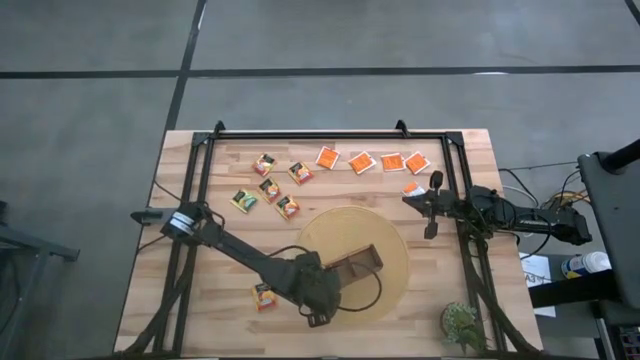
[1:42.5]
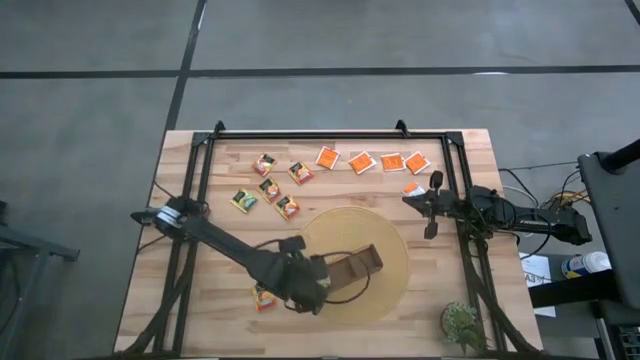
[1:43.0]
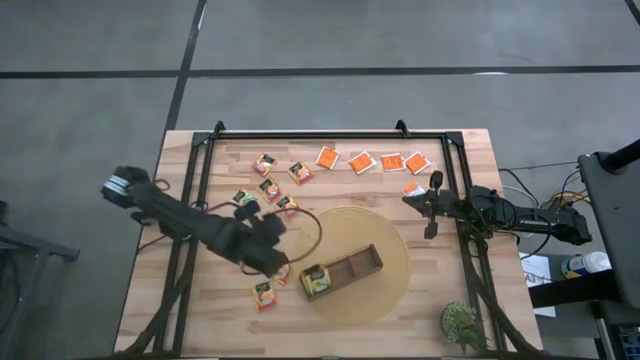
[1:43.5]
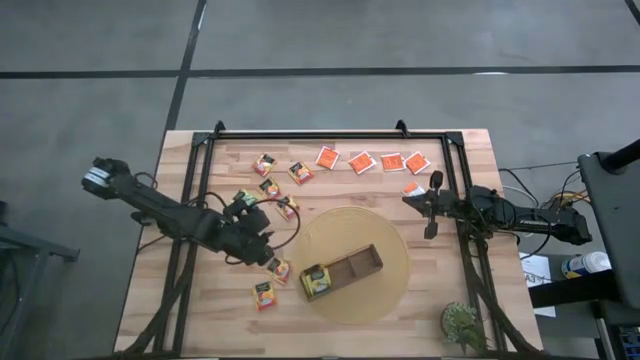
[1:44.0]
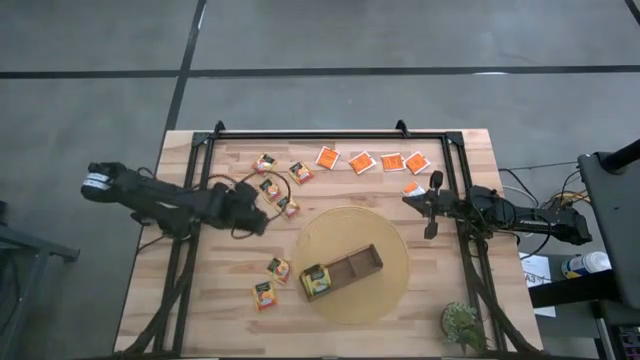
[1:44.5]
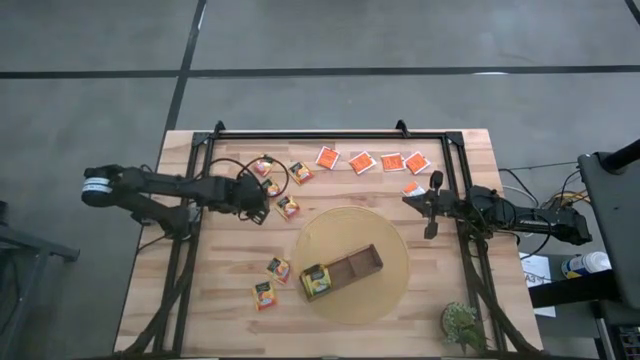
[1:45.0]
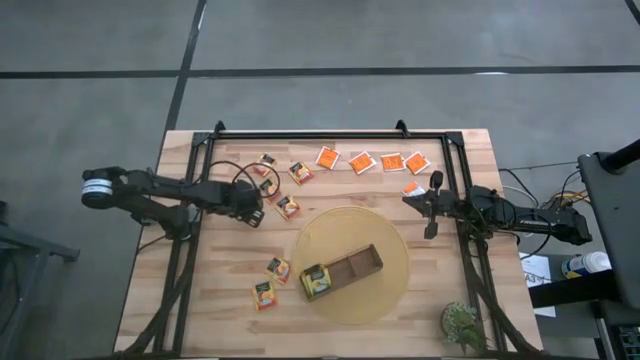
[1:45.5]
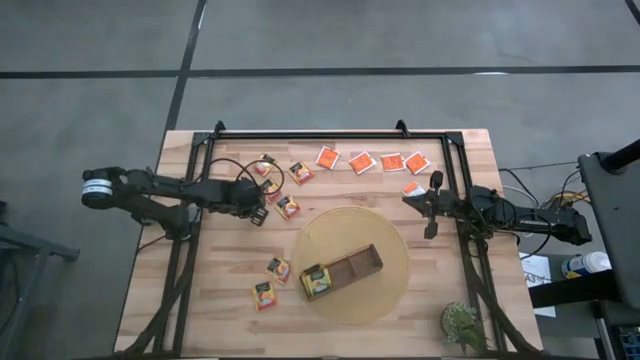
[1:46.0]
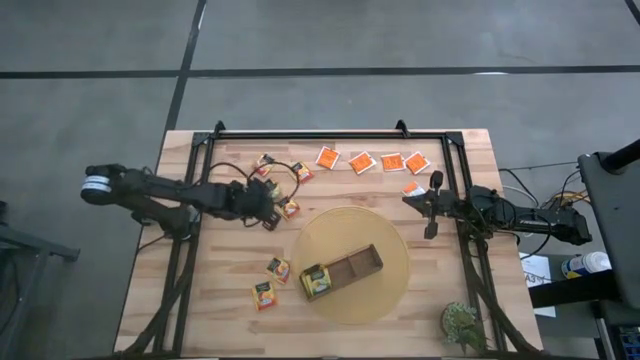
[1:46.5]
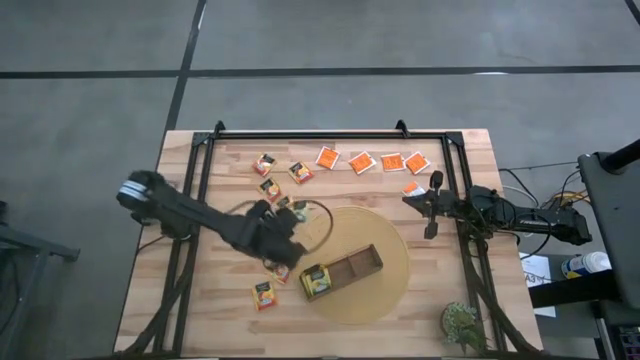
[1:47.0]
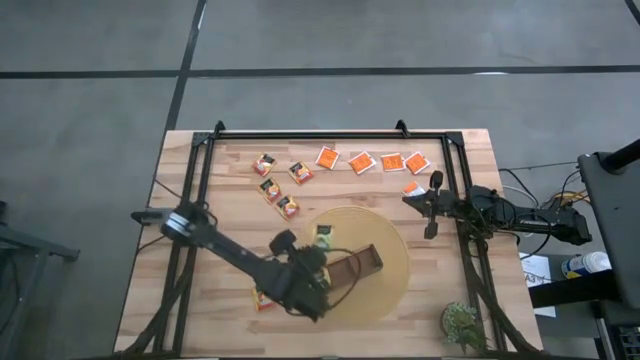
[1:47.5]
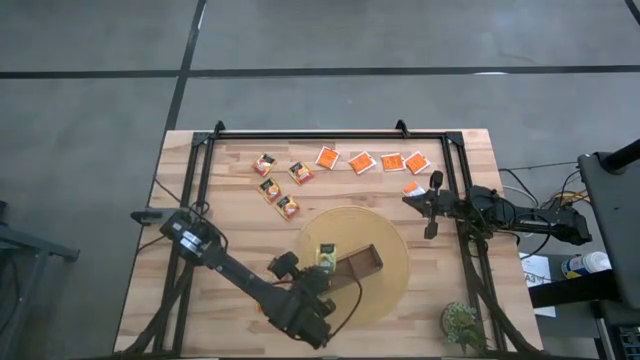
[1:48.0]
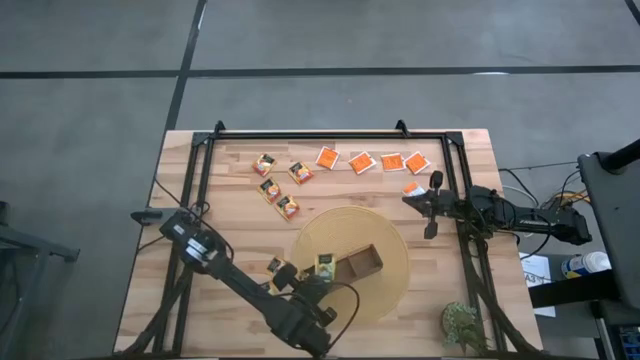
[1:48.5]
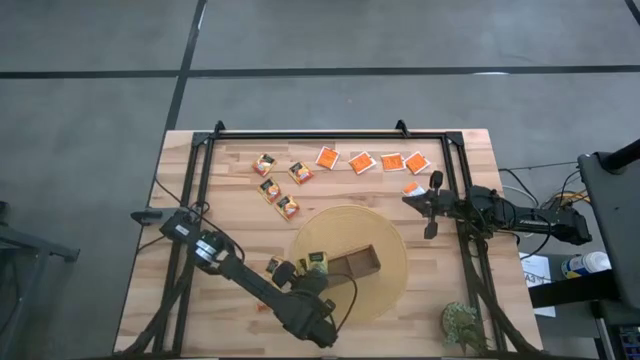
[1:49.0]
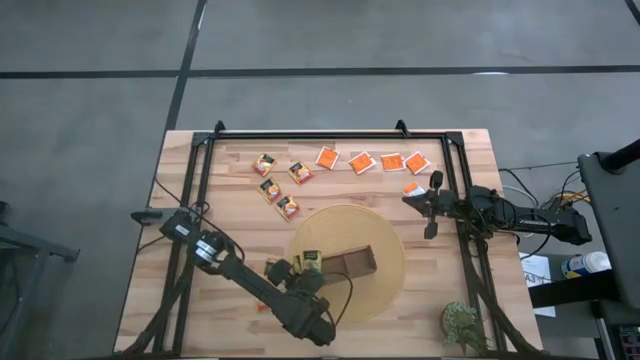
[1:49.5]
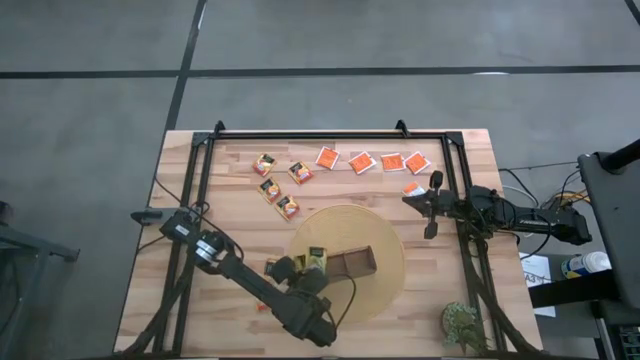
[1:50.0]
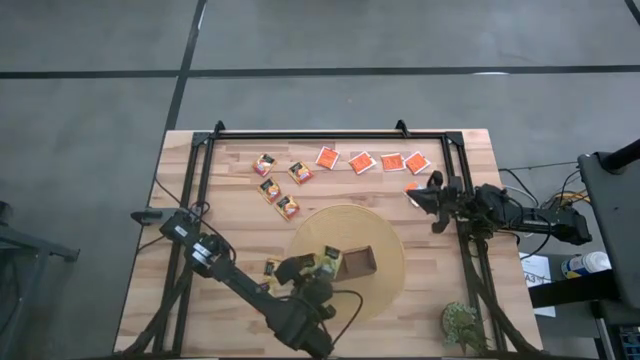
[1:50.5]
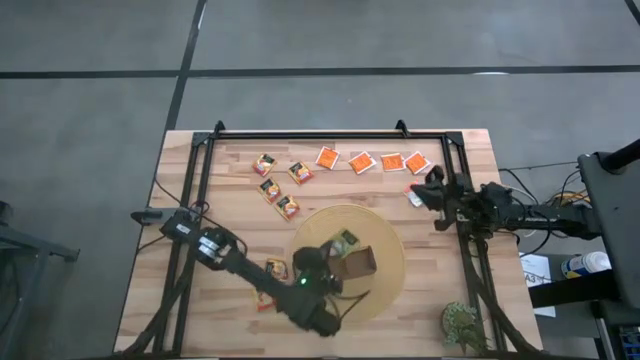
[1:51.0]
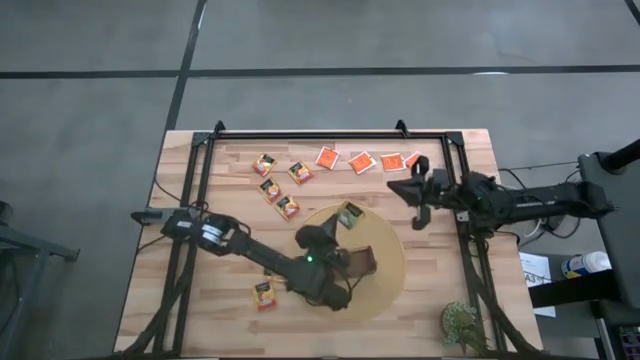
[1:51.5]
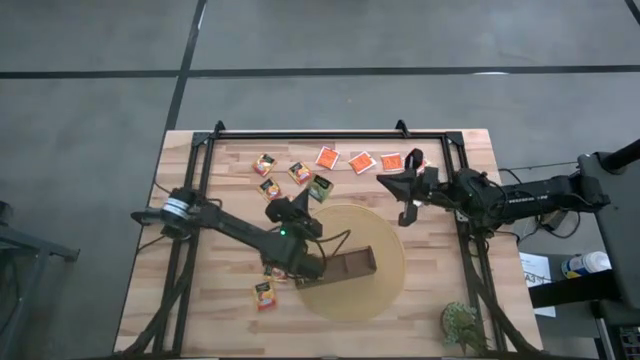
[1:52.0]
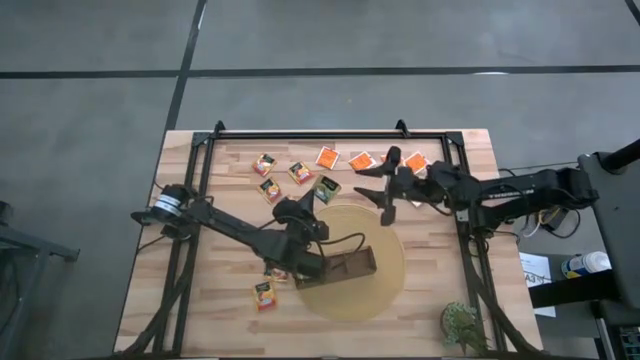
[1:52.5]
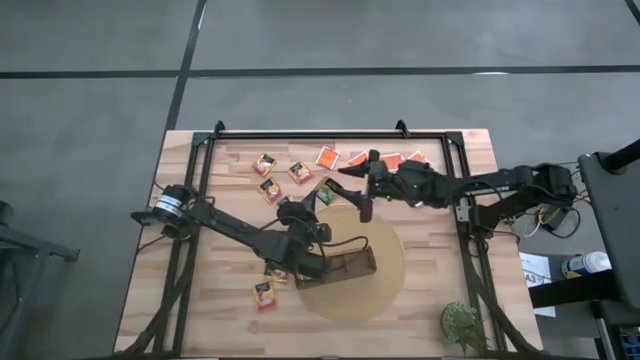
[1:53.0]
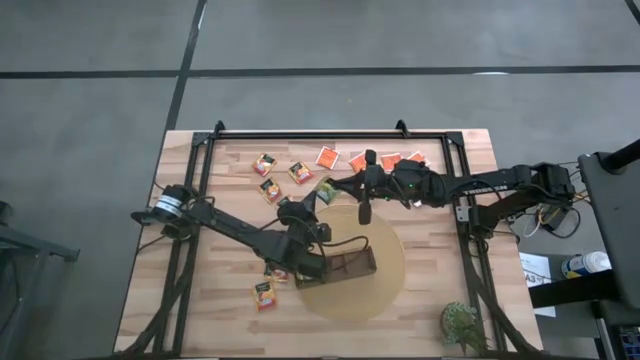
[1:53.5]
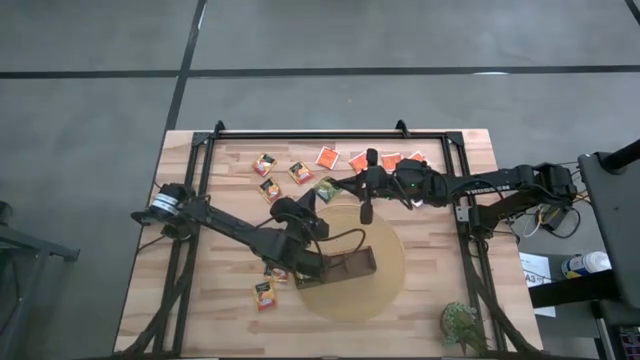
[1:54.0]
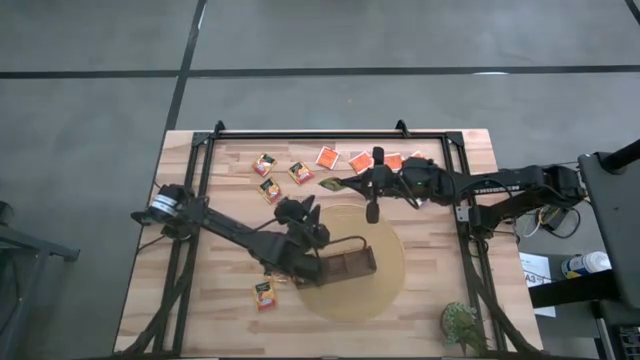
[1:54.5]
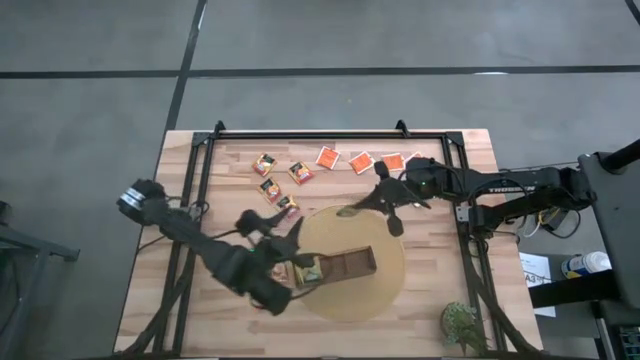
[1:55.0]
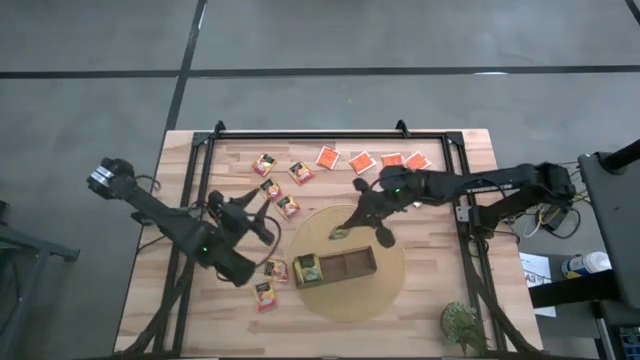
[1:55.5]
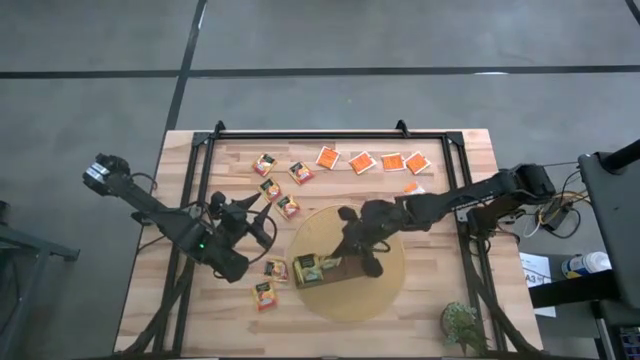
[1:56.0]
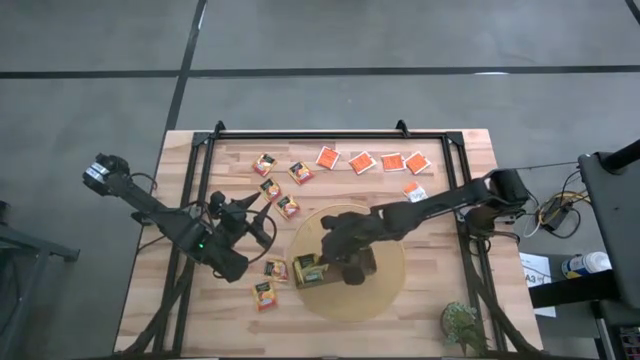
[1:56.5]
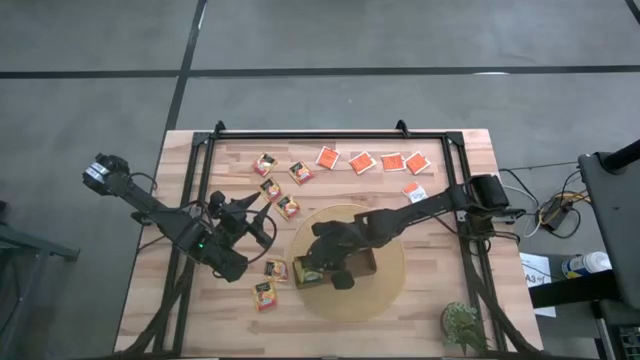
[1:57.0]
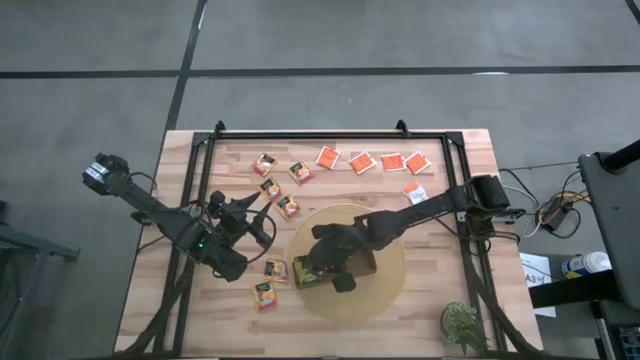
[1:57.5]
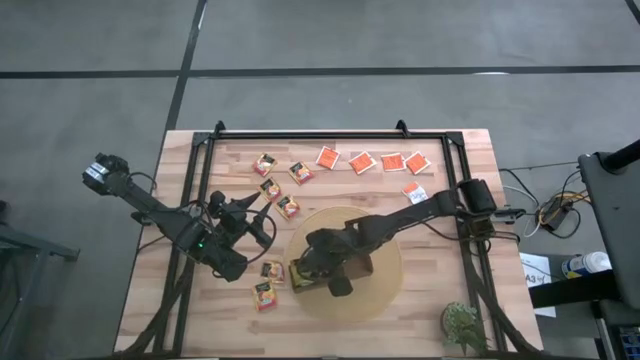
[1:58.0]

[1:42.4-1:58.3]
Task: Pick & Place Tea
Put the green tea bag into the left section of the wooden organizer

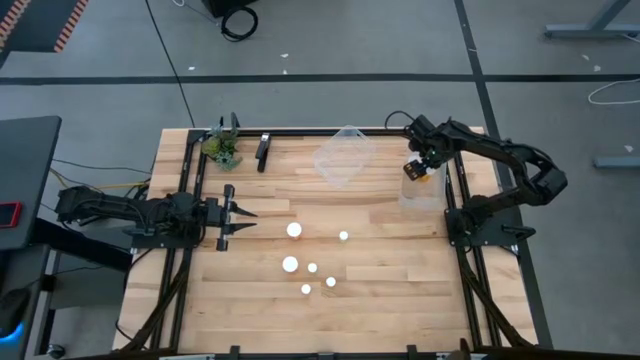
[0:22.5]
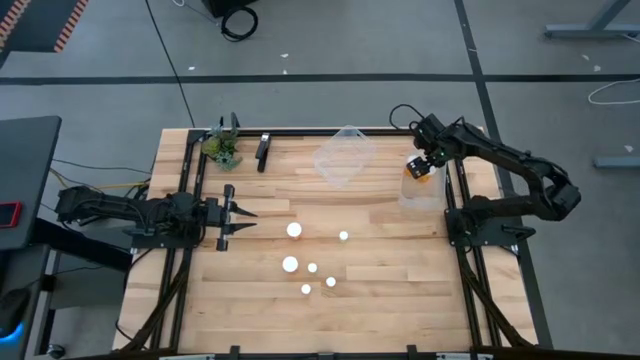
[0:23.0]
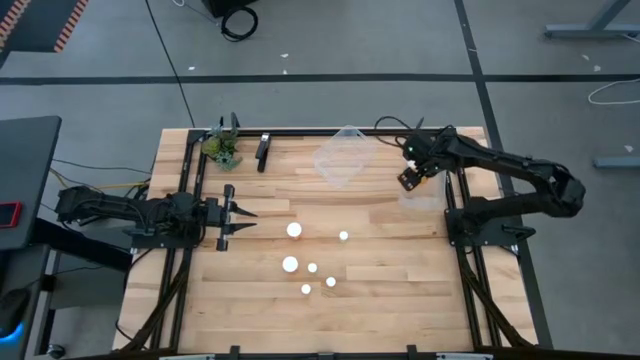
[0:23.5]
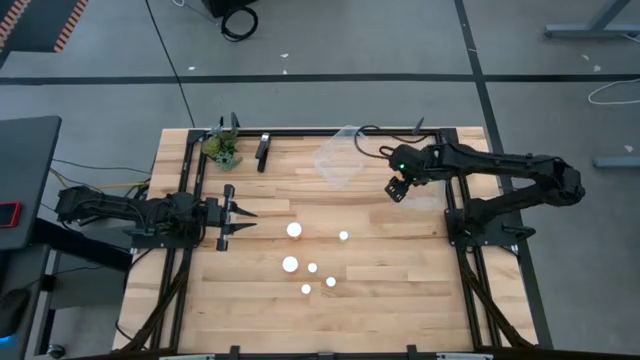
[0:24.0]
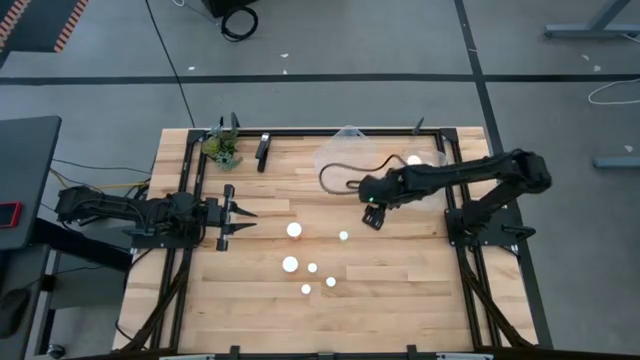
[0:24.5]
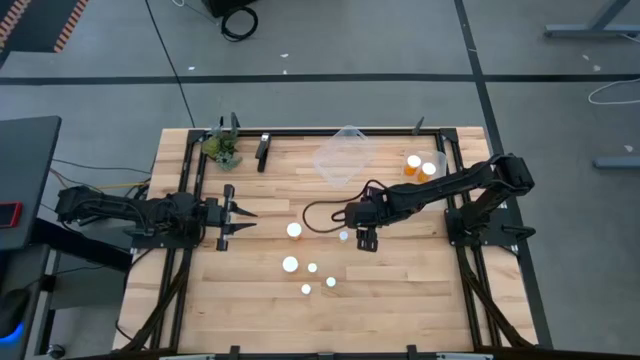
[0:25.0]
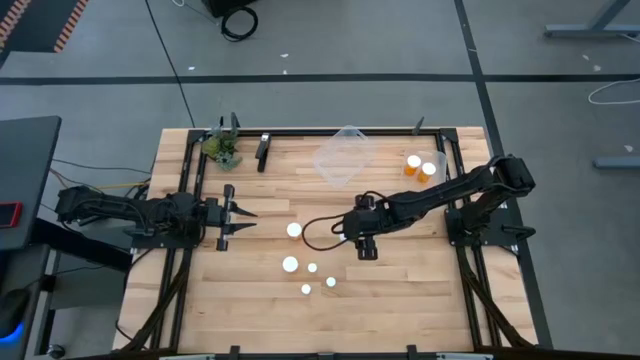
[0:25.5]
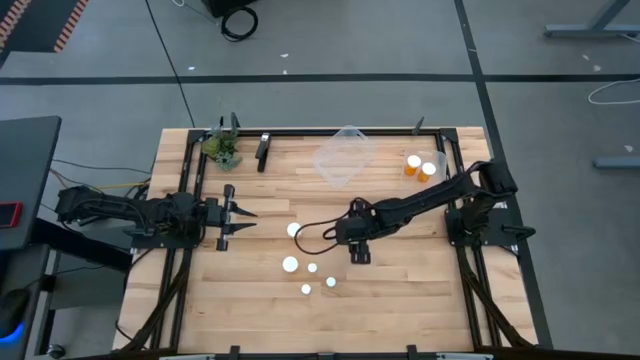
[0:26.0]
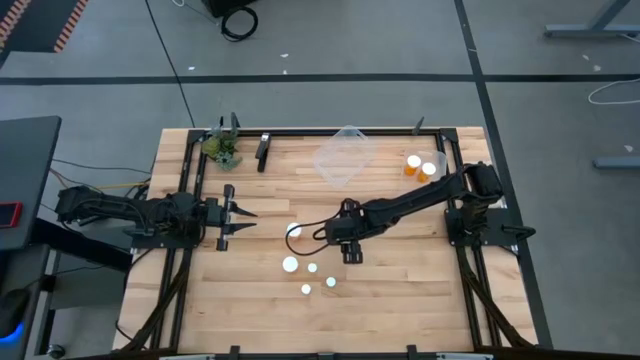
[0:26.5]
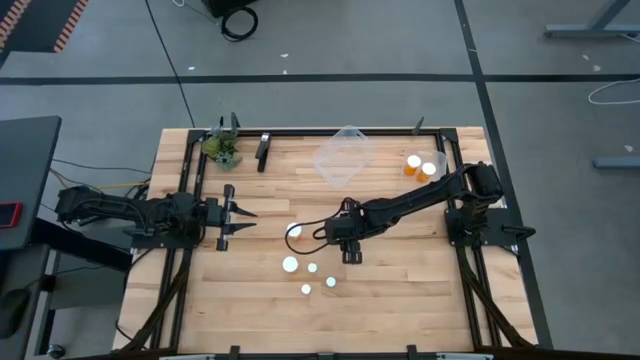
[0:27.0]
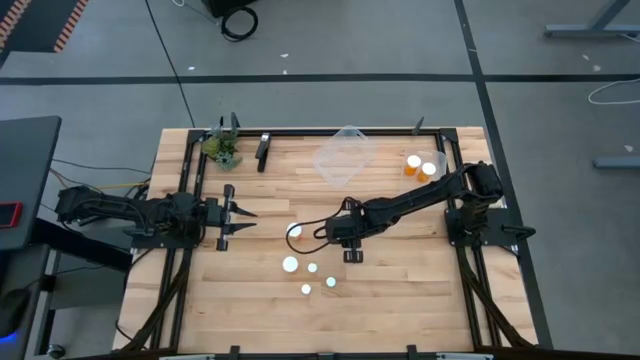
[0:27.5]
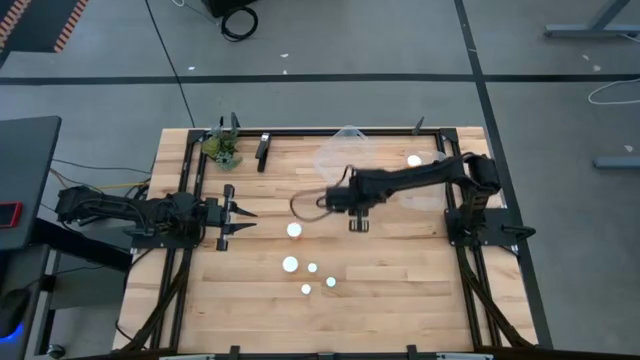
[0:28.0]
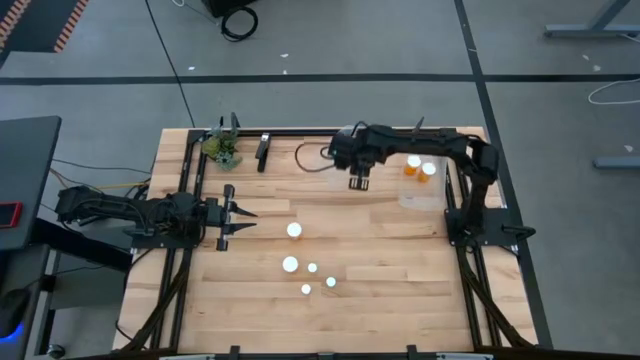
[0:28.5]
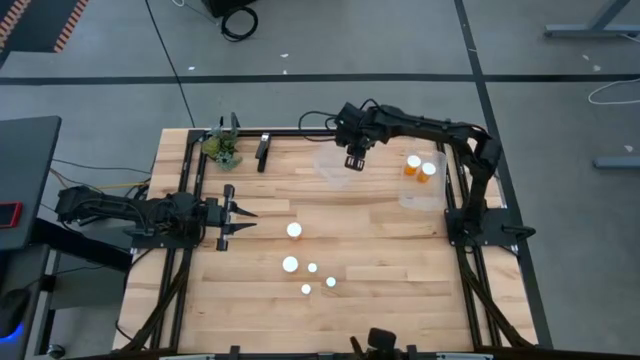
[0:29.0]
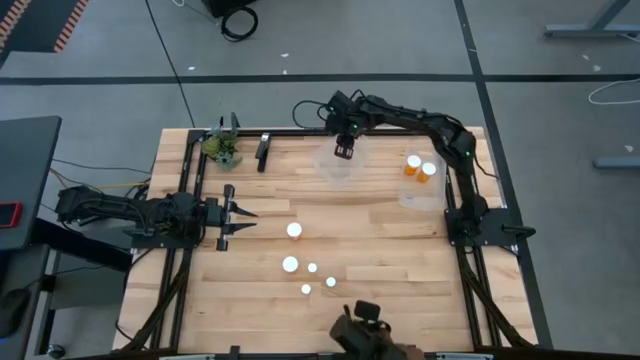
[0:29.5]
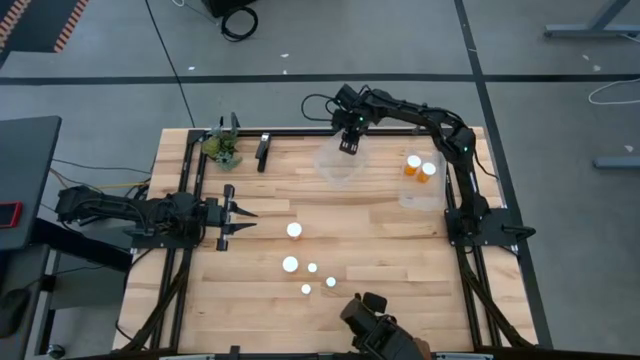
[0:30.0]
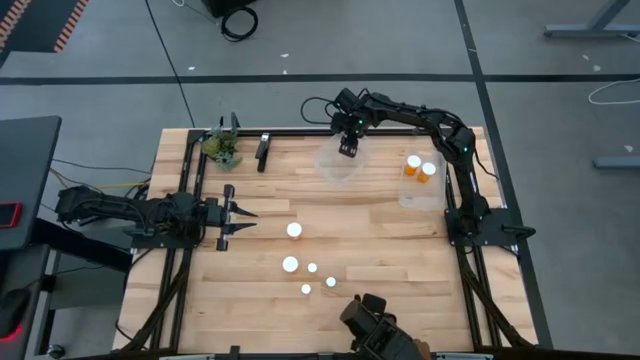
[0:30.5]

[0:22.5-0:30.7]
Task: Pick and place medicine bottles into bin by pill shape (circle, oval)
Put the small yellow pill bottle into the left transparent bin
